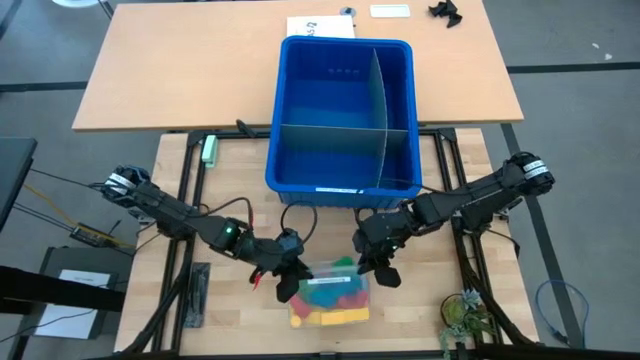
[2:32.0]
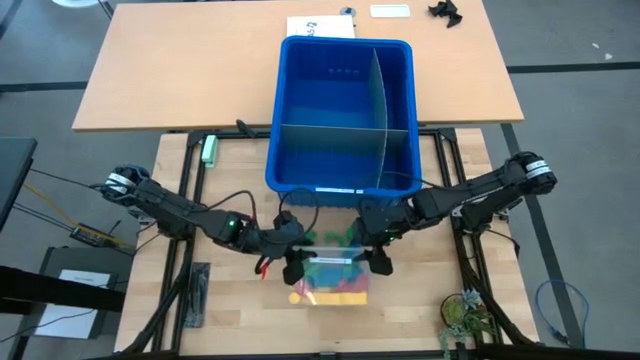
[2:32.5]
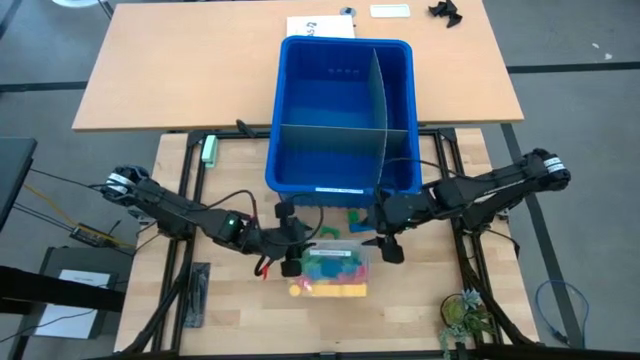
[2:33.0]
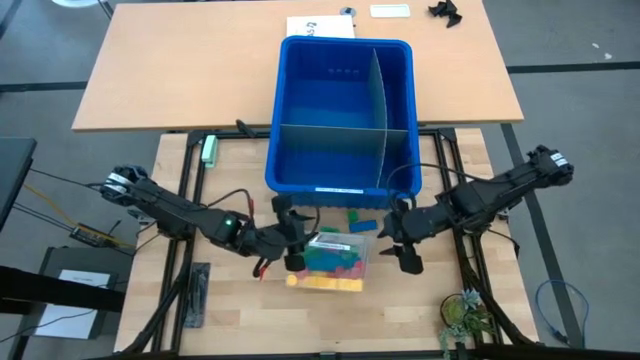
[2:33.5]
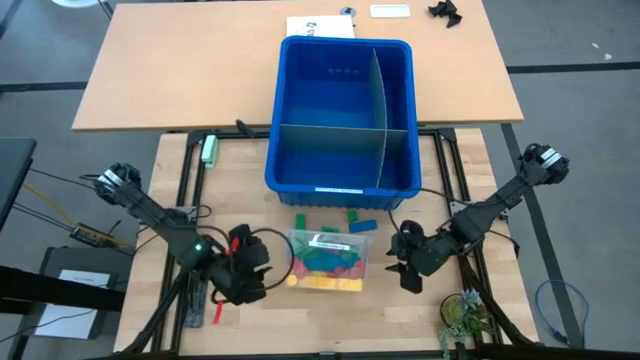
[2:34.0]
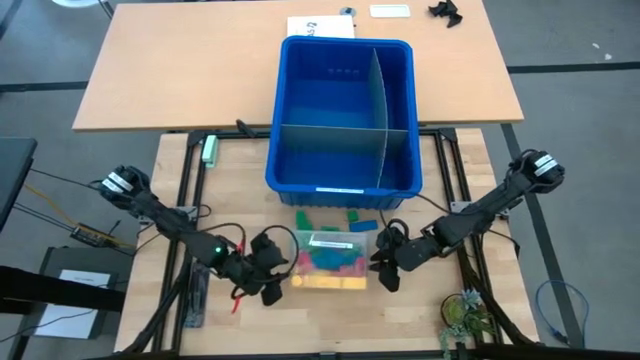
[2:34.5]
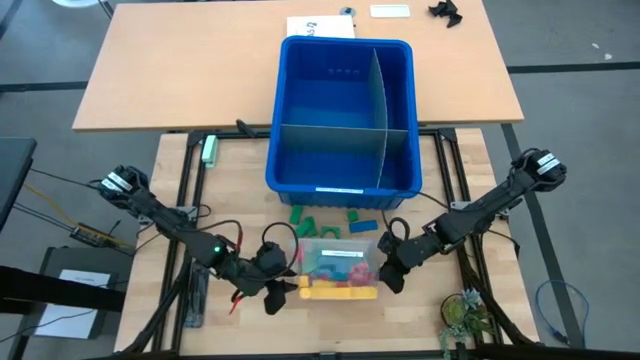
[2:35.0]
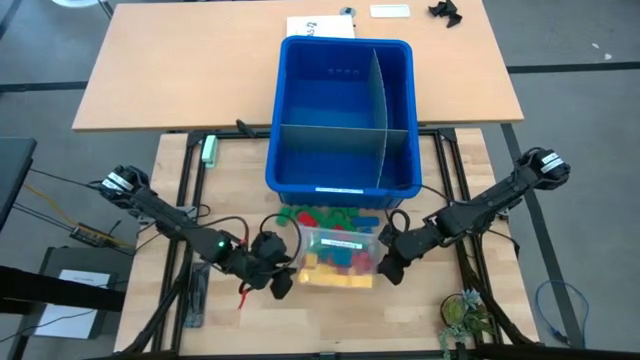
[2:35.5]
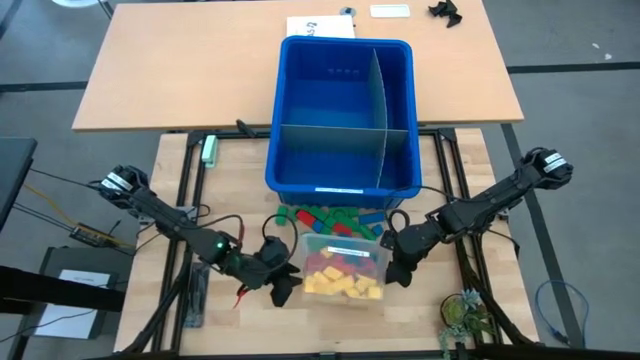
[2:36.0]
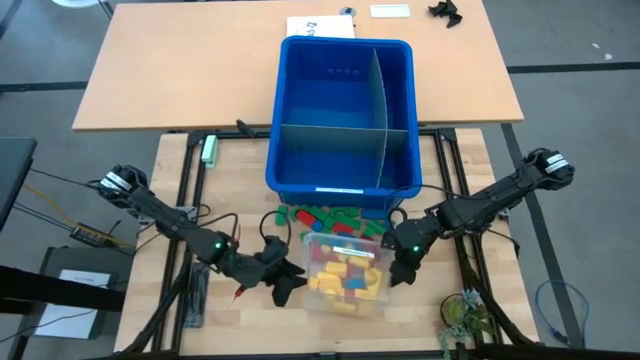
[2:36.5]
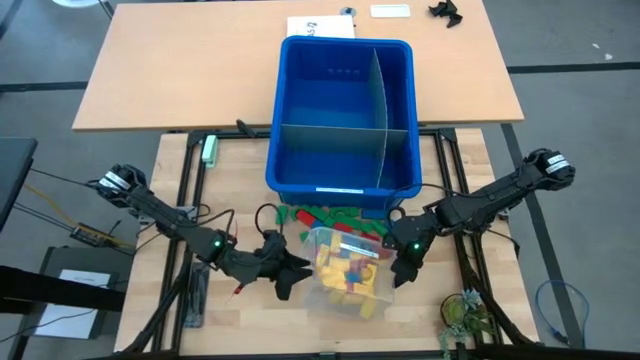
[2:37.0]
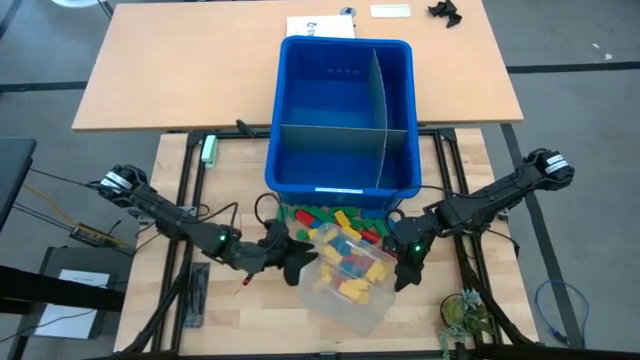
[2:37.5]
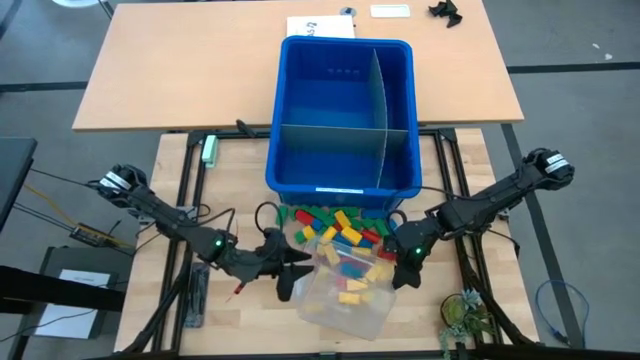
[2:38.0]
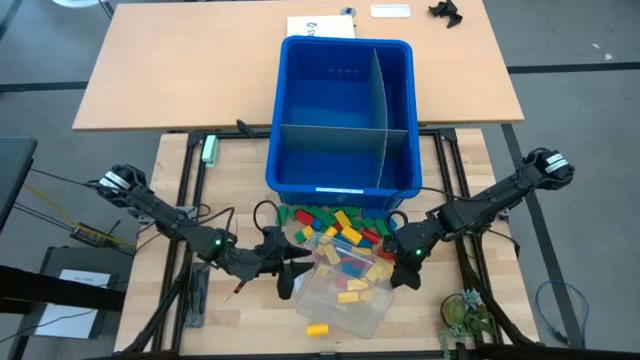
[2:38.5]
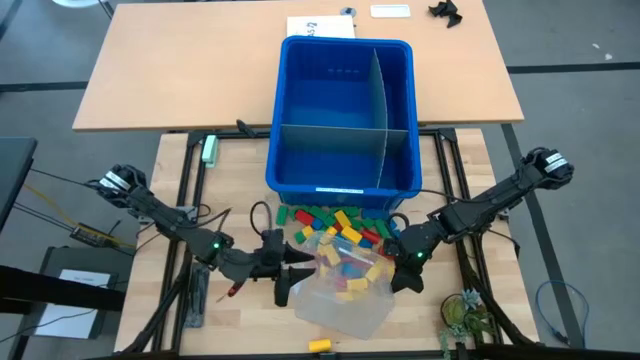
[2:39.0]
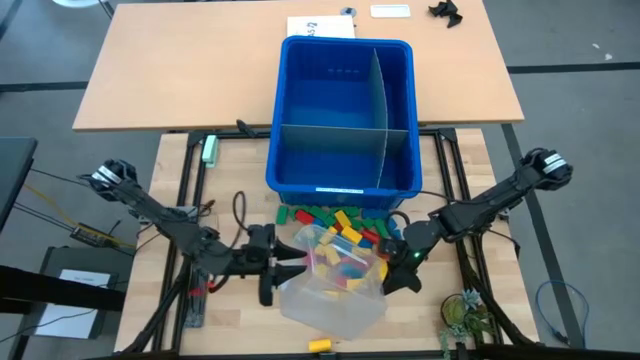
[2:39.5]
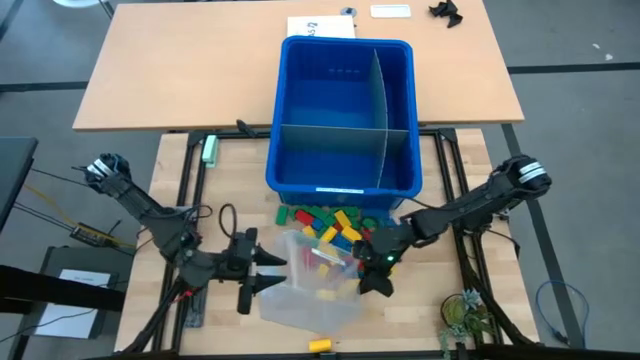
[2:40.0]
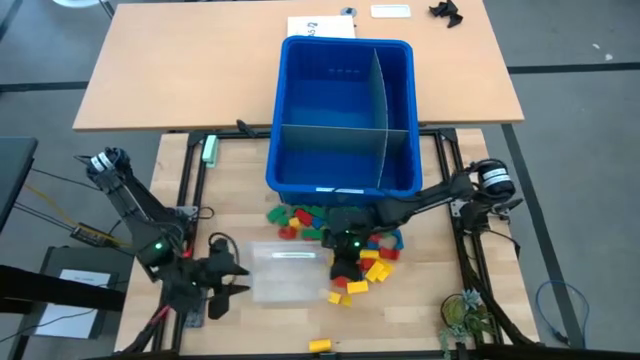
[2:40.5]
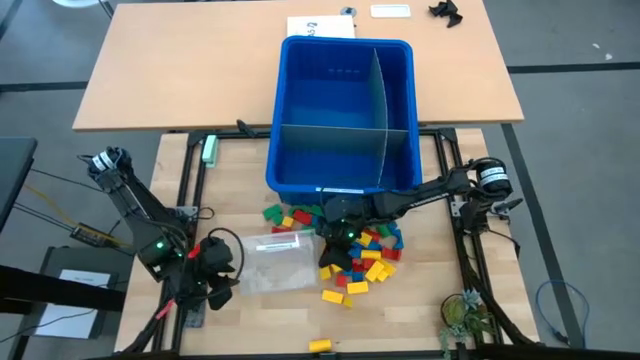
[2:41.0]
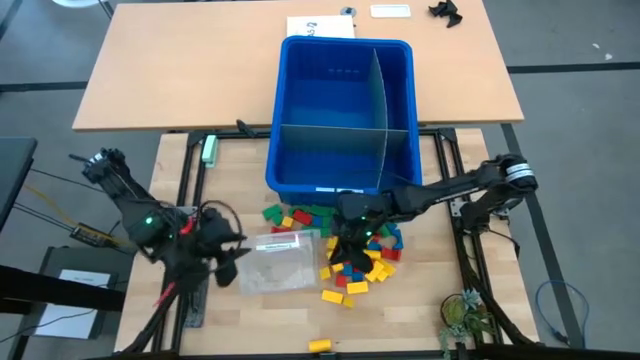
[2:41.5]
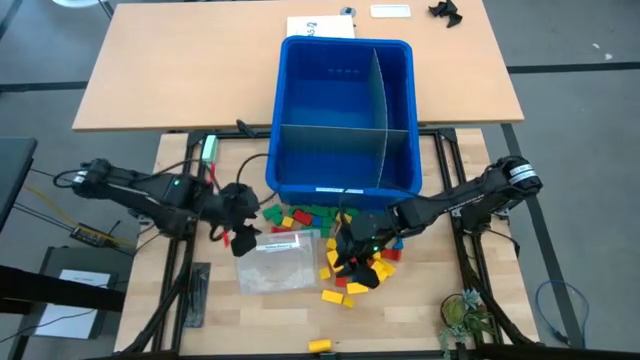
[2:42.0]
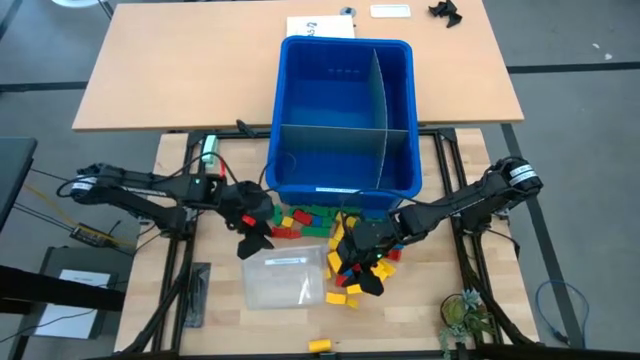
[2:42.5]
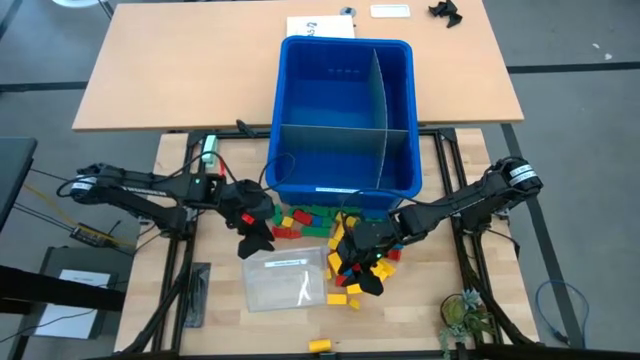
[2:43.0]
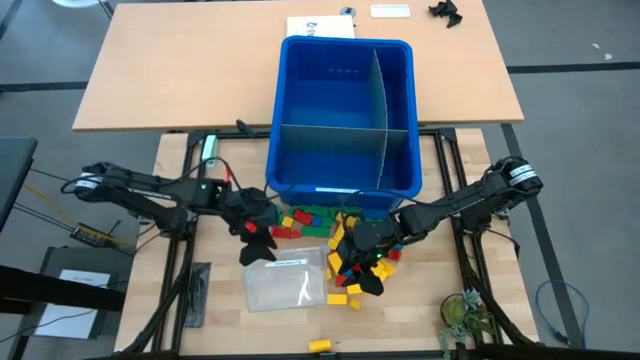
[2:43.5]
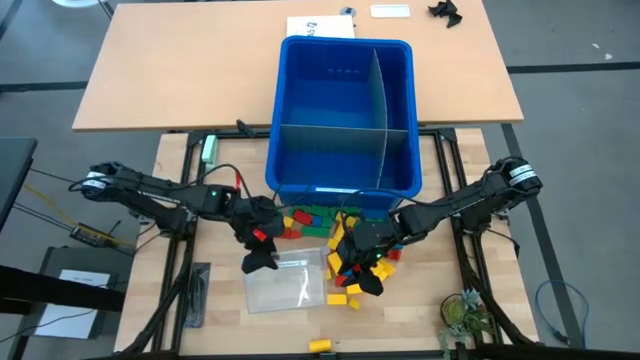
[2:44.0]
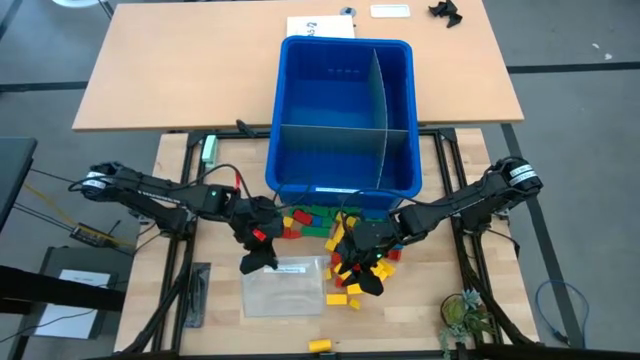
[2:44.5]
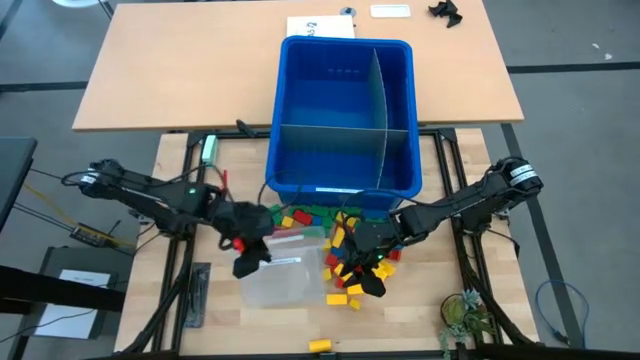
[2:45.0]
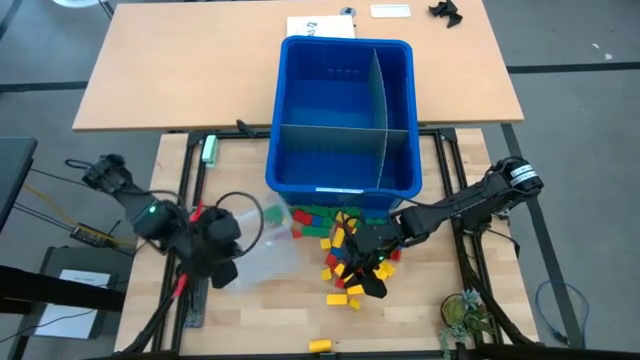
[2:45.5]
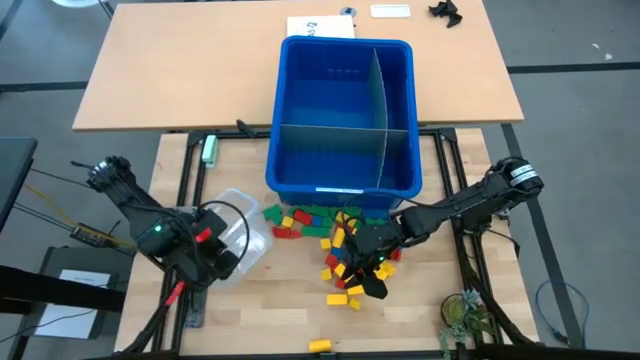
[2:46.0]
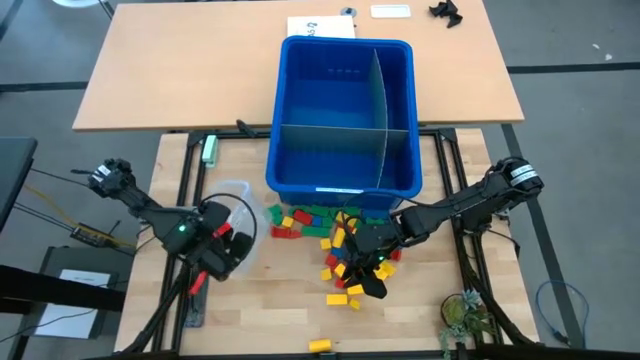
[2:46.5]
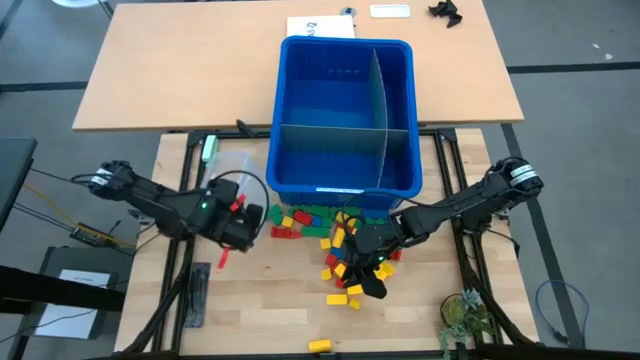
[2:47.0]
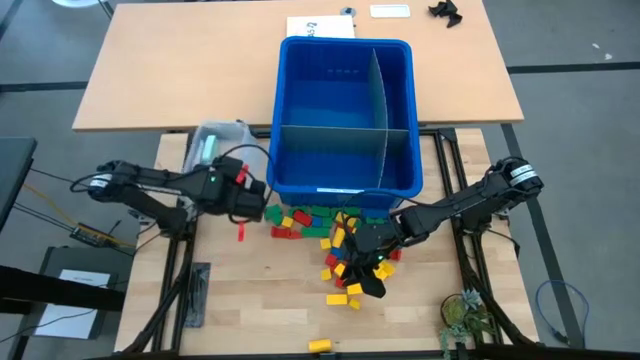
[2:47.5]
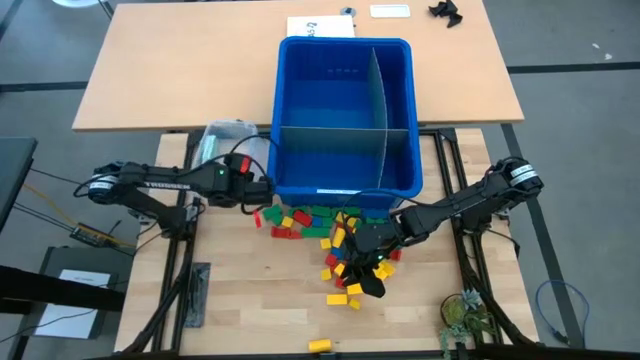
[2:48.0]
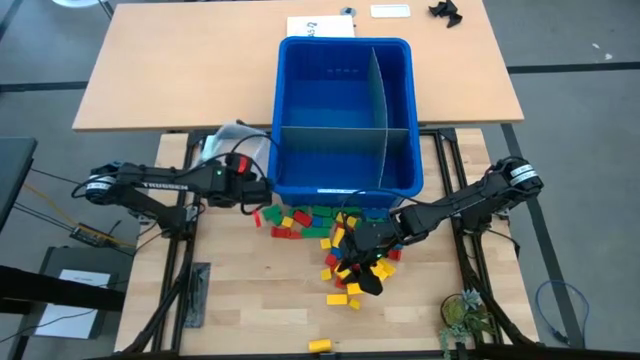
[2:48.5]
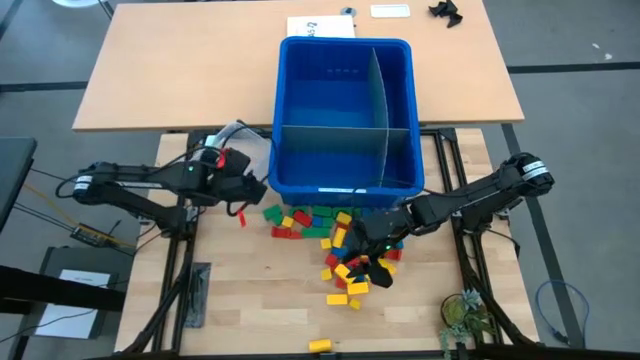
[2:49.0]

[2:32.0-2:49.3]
Task: Sort blocks
Pour the blocks on the table from the transparent bin

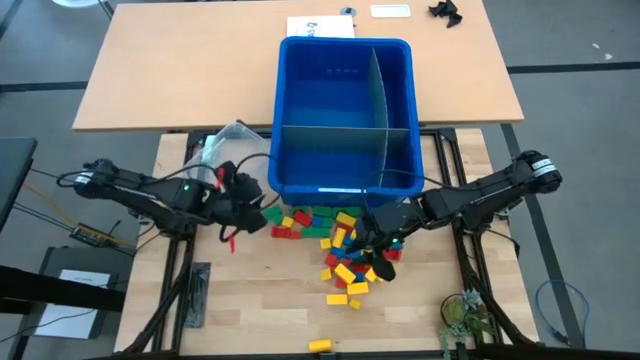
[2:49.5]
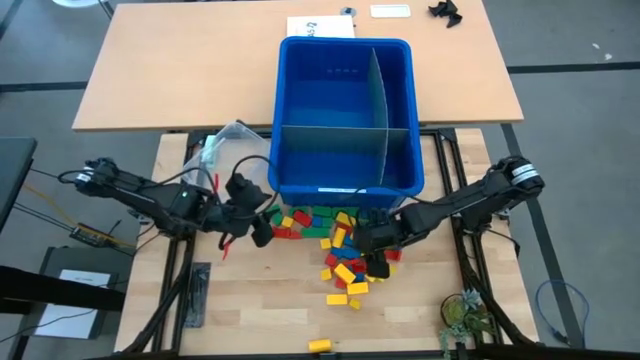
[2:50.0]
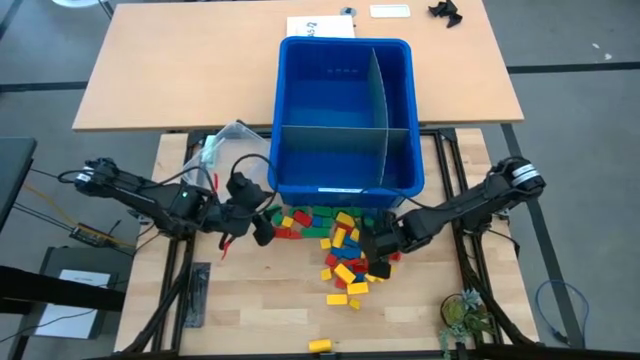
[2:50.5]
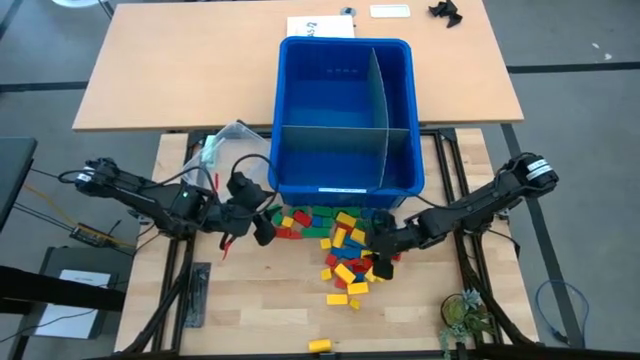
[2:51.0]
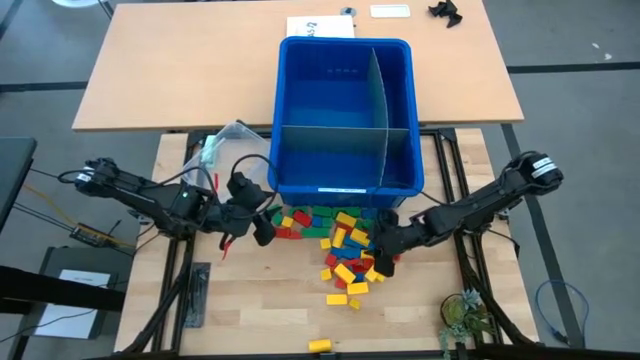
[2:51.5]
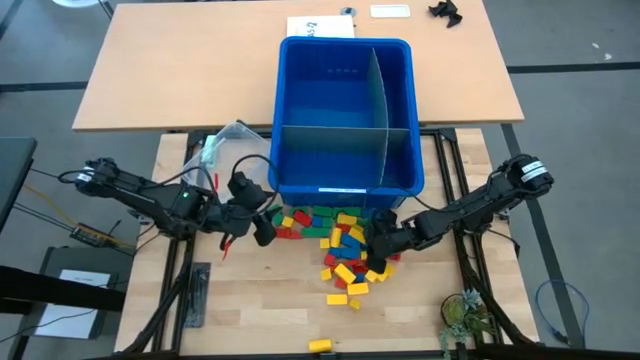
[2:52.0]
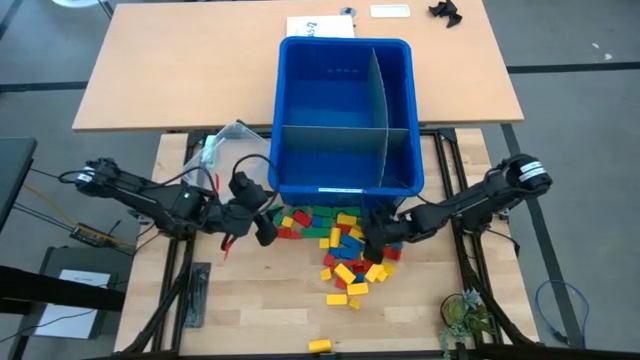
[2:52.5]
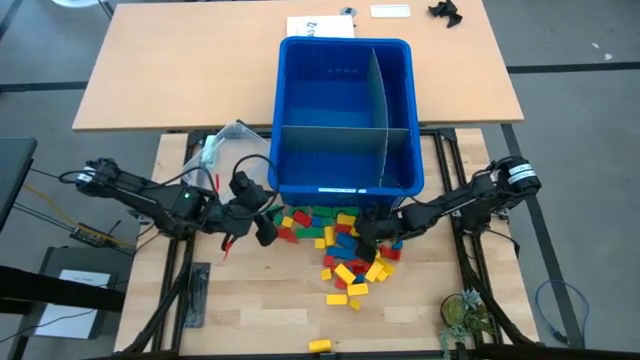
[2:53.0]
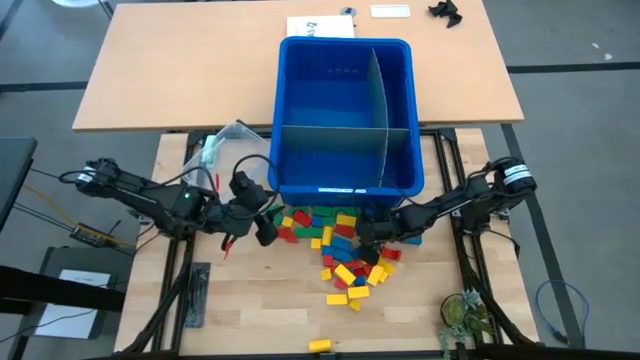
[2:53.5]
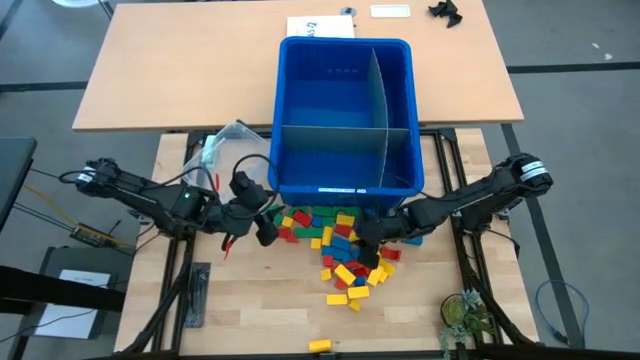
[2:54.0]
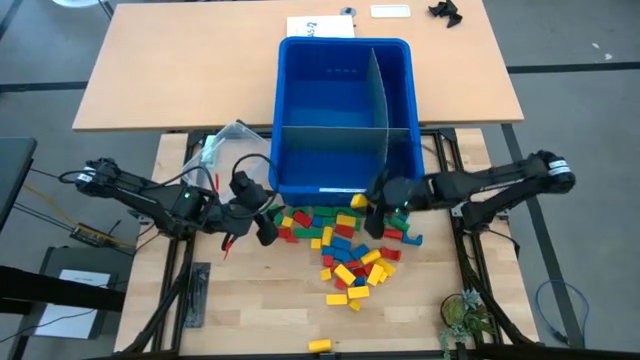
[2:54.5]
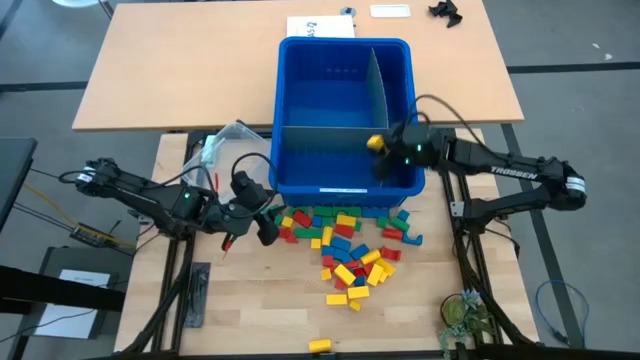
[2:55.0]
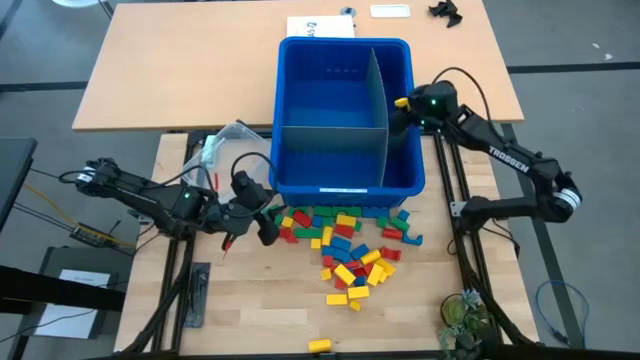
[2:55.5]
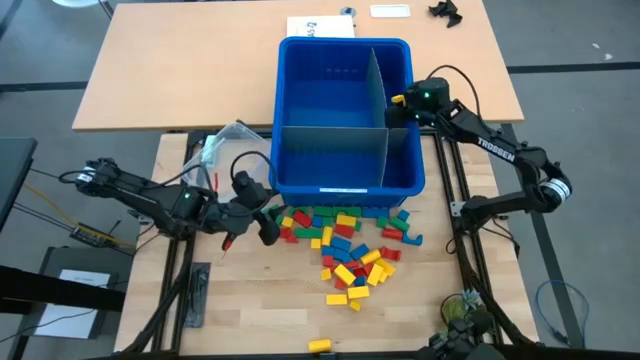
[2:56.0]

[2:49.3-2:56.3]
Put the yellow block into the blue bin
